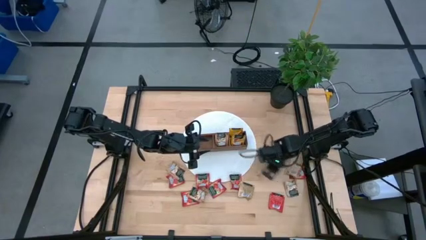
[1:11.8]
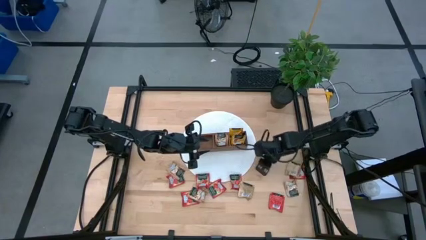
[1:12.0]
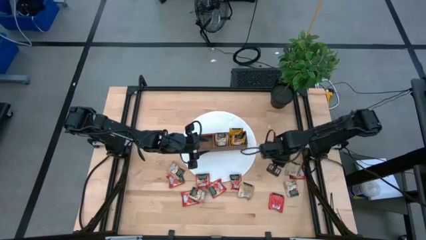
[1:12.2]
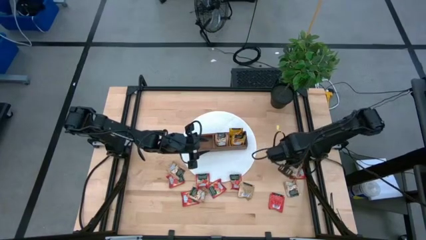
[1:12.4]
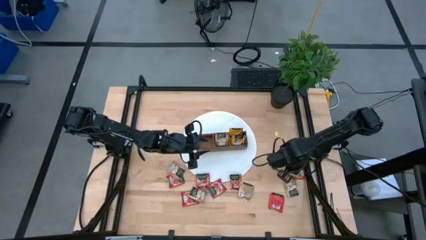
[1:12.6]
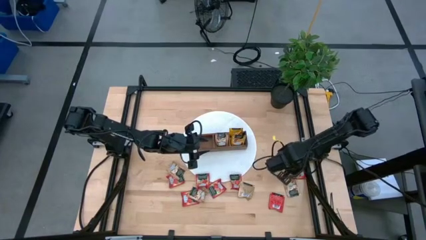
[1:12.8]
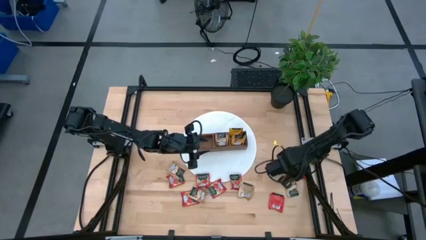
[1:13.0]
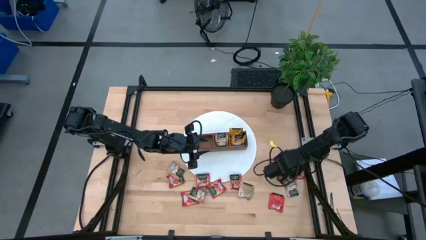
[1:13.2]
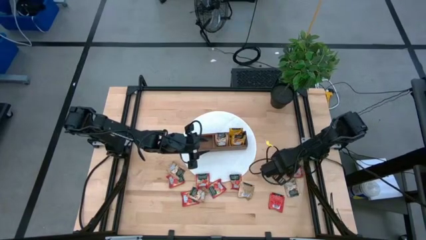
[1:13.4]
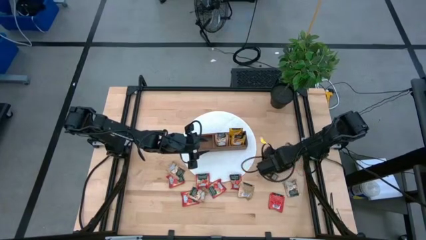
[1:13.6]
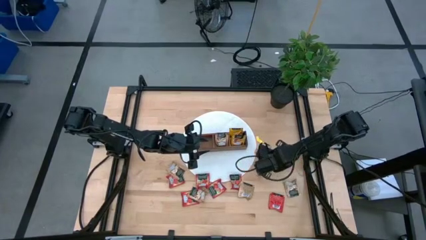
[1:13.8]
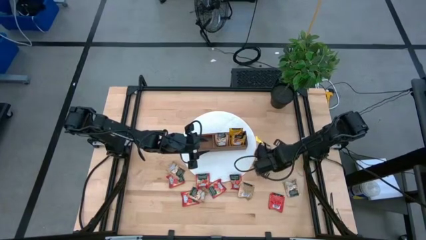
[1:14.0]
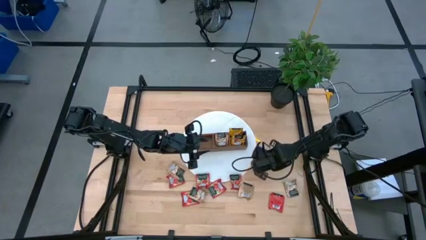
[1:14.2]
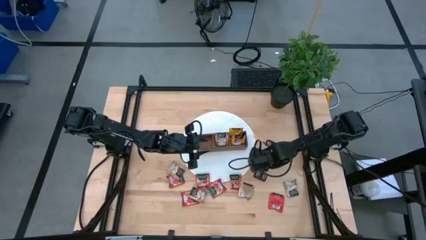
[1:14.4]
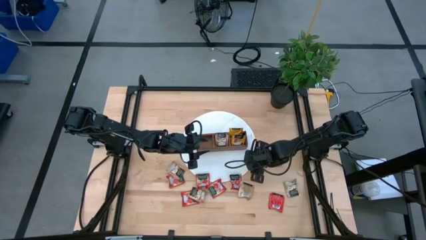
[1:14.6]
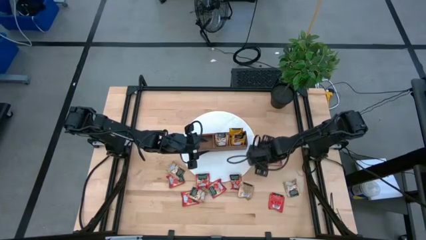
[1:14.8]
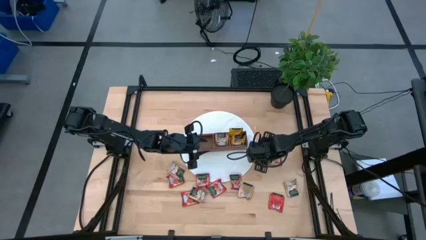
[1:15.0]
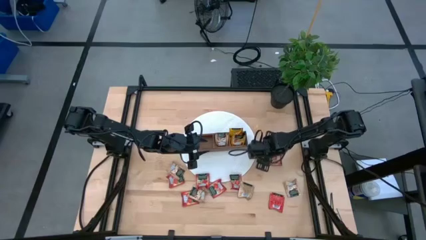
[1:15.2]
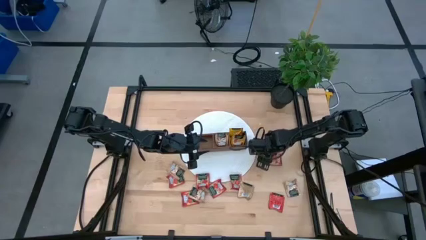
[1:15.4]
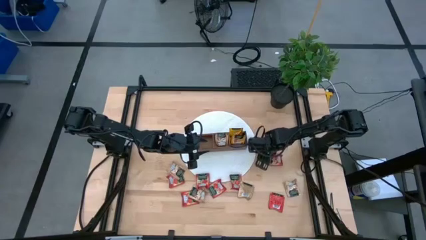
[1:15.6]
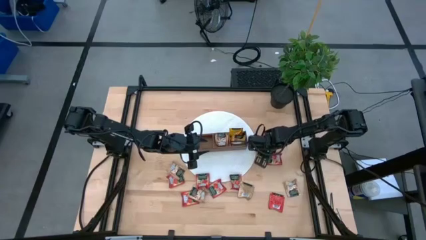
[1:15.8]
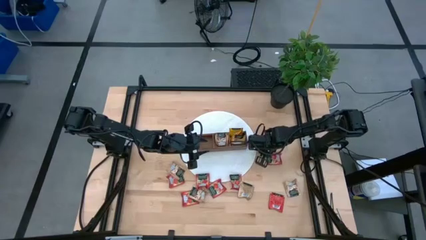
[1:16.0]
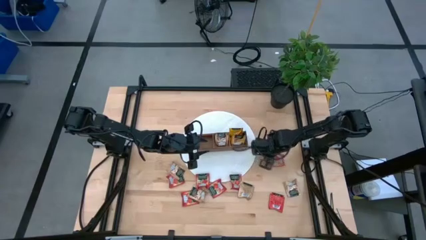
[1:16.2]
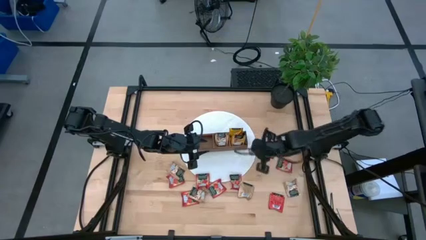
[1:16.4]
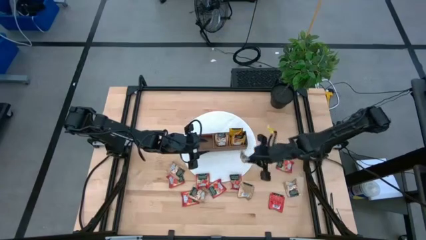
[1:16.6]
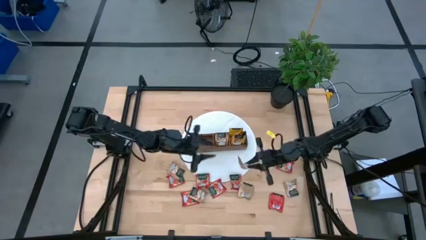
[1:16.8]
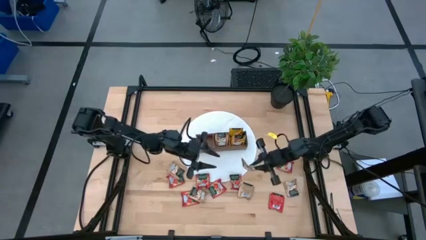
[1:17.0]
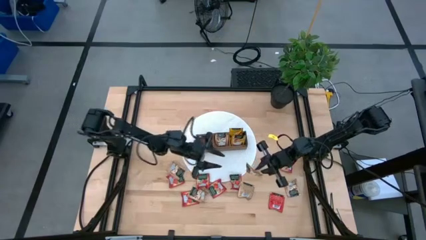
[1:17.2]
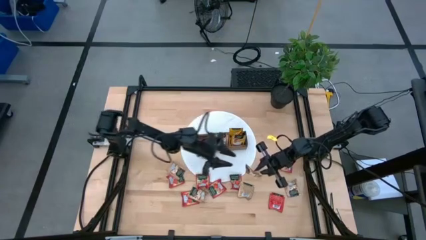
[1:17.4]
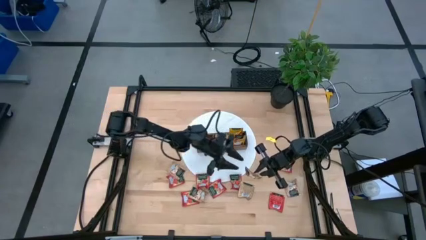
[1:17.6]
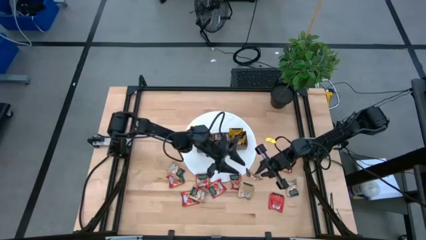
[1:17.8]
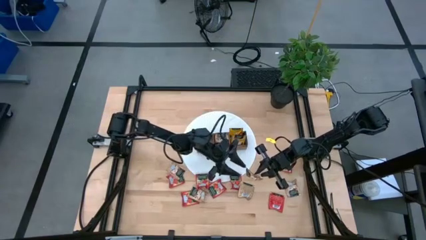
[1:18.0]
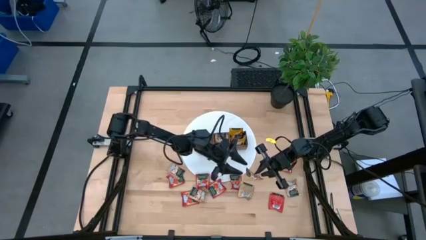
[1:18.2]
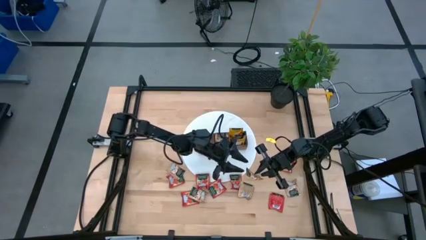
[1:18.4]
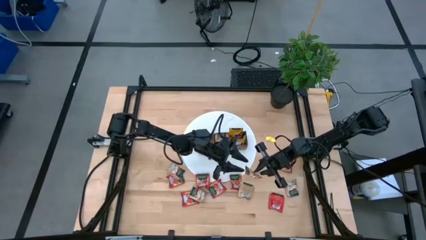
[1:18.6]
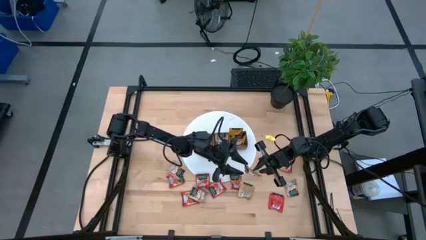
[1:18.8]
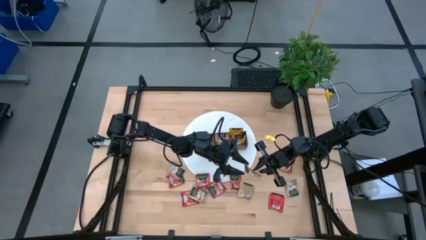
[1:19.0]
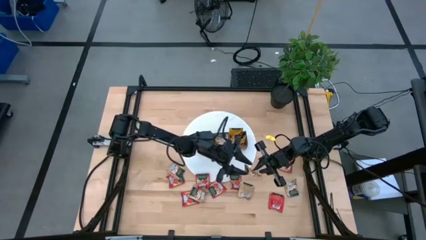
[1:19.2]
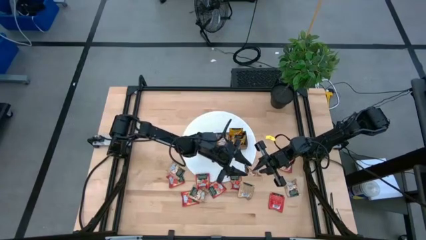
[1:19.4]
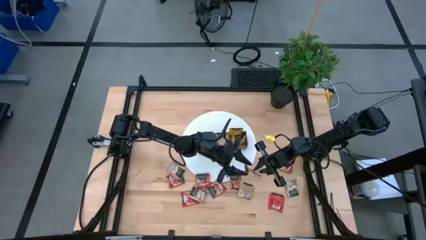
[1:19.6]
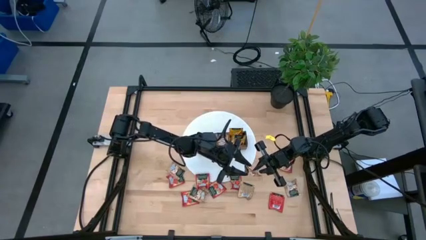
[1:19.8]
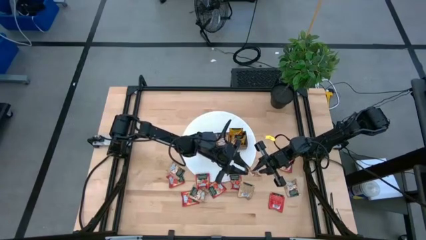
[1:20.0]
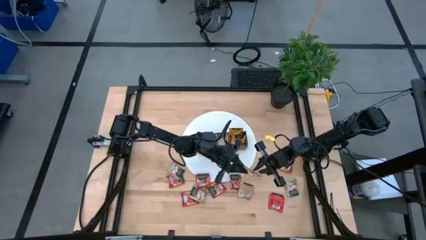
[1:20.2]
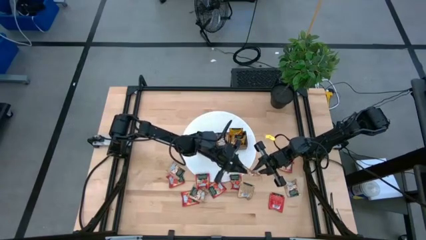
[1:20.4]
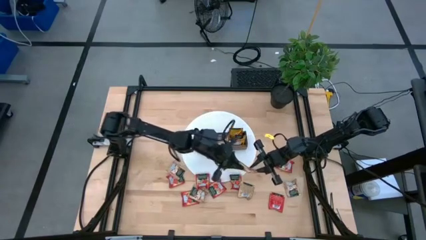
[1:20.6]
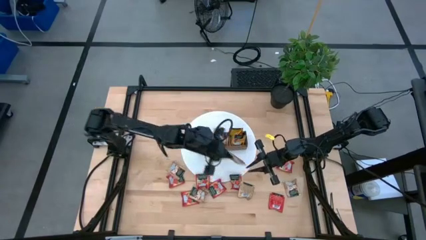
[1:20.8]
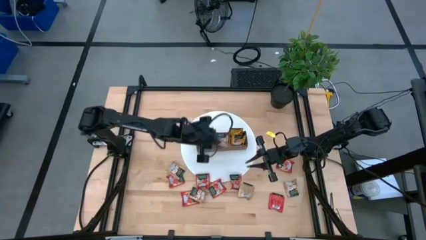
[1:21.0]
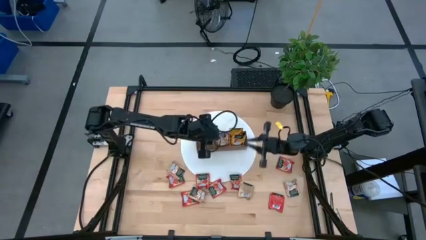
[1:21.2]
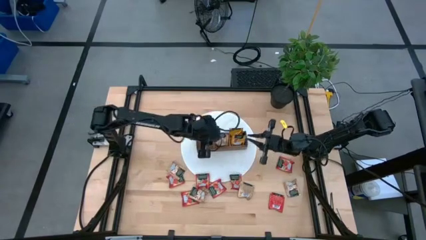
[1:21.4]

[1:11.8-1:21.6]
Task: Pick & Place Tea
Put the brown tea bag into the middle section of the wooden organizer

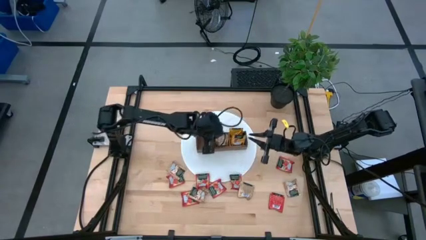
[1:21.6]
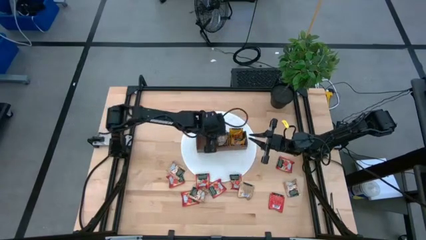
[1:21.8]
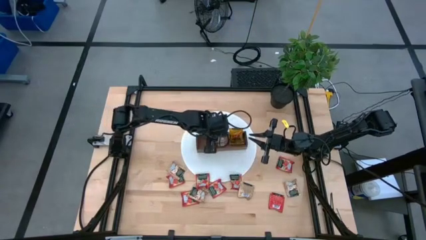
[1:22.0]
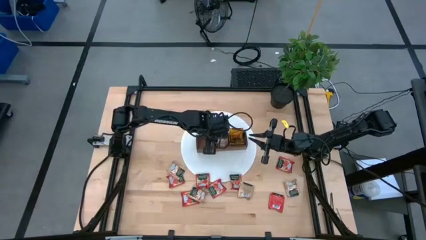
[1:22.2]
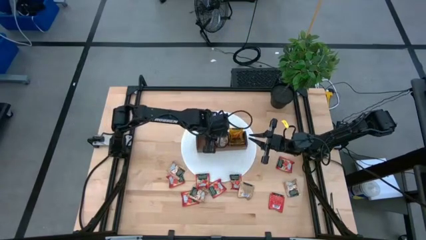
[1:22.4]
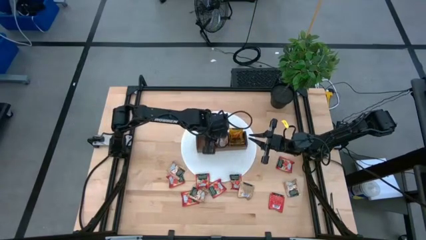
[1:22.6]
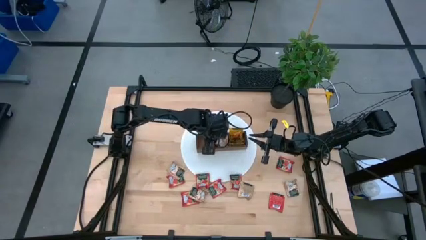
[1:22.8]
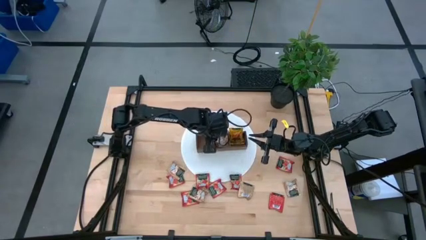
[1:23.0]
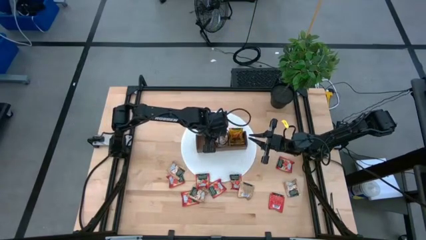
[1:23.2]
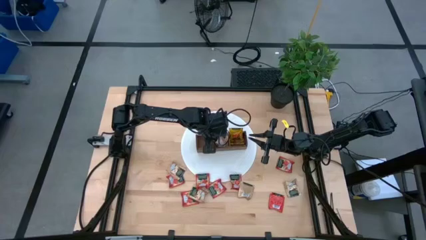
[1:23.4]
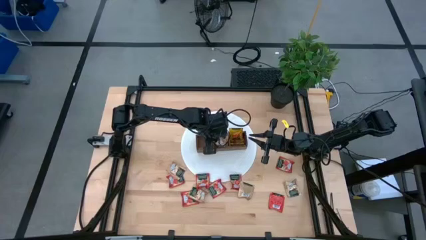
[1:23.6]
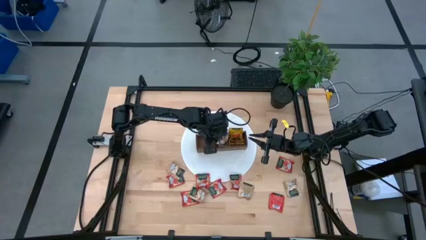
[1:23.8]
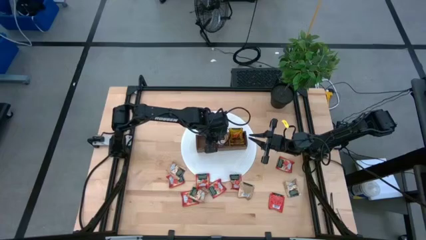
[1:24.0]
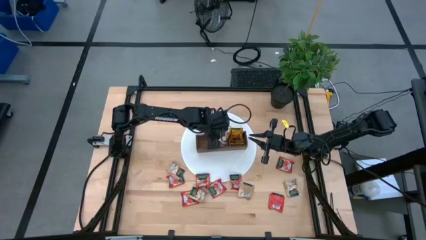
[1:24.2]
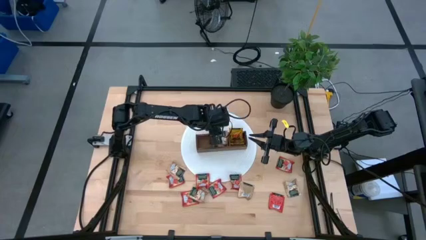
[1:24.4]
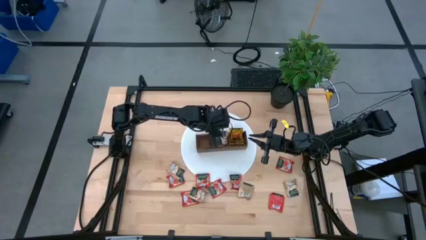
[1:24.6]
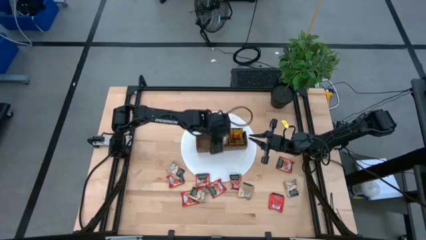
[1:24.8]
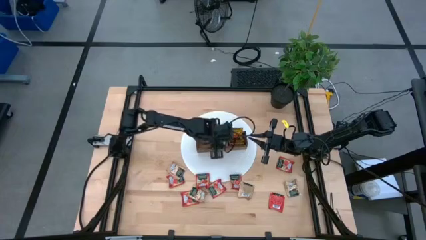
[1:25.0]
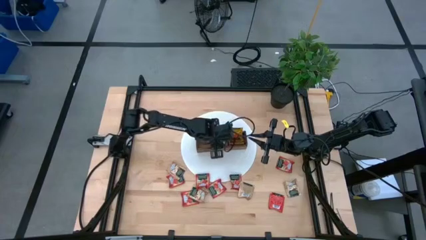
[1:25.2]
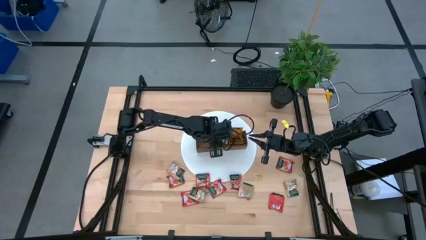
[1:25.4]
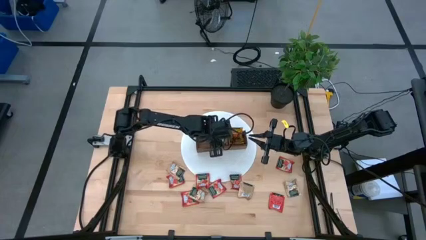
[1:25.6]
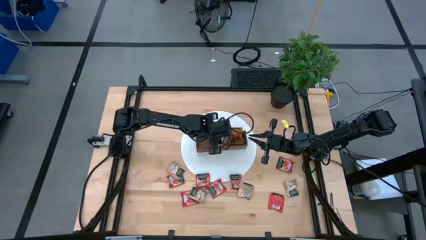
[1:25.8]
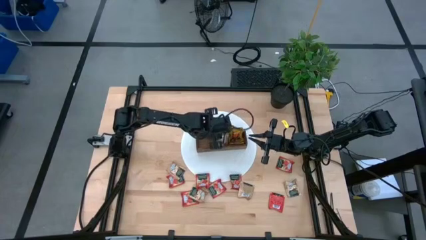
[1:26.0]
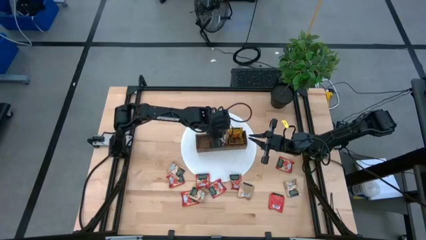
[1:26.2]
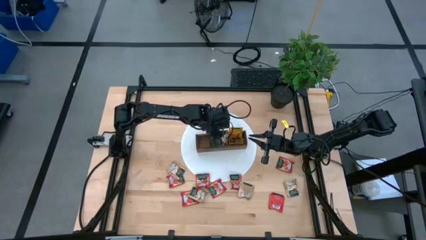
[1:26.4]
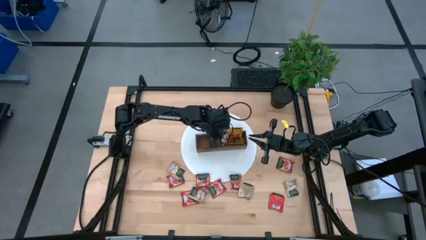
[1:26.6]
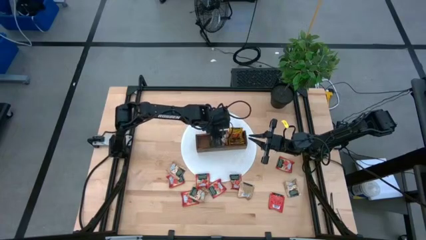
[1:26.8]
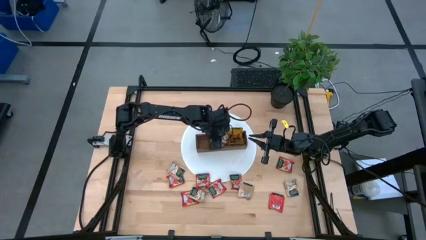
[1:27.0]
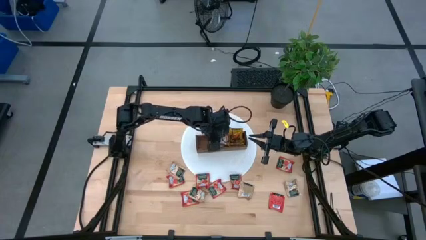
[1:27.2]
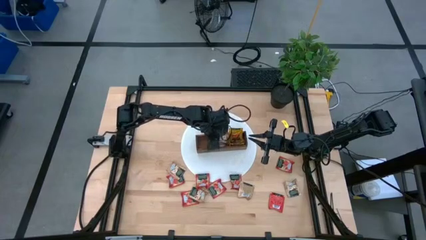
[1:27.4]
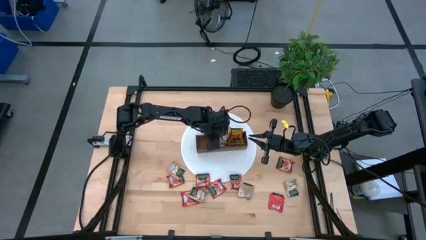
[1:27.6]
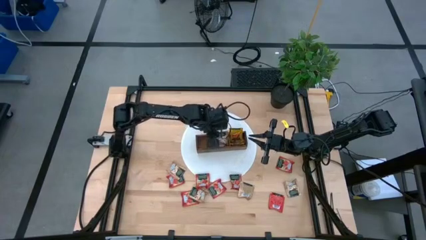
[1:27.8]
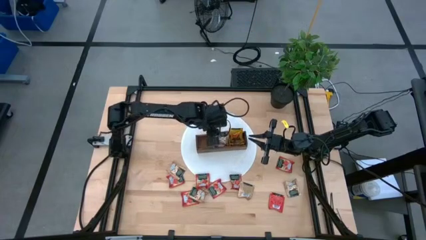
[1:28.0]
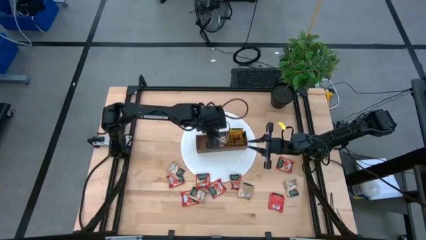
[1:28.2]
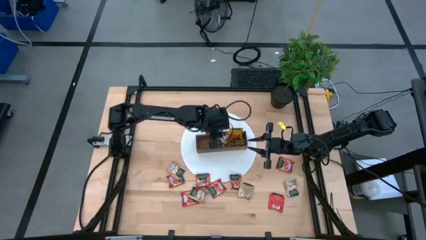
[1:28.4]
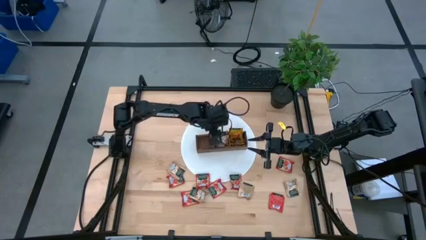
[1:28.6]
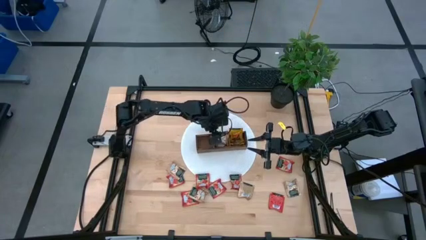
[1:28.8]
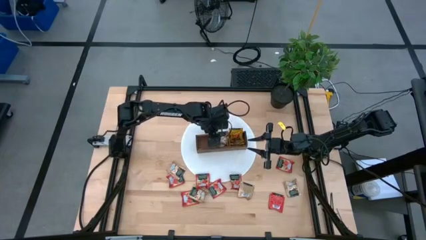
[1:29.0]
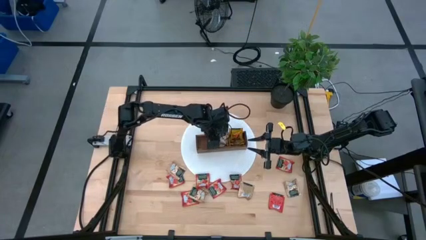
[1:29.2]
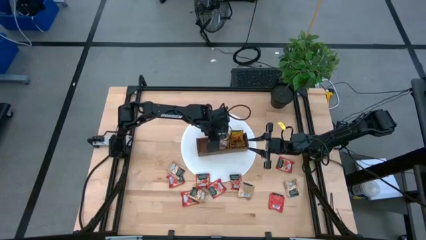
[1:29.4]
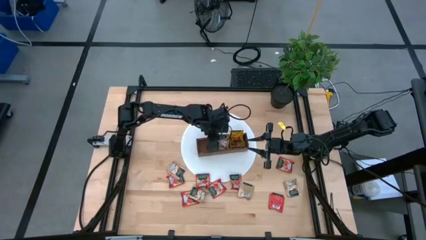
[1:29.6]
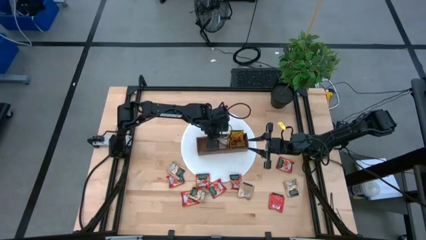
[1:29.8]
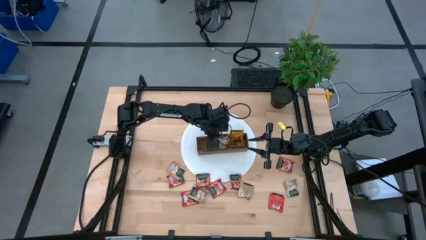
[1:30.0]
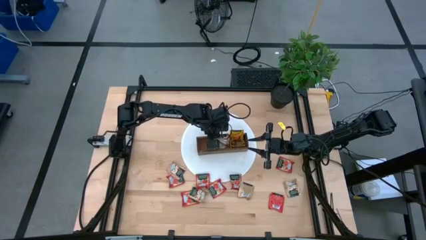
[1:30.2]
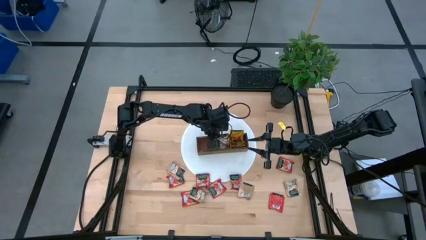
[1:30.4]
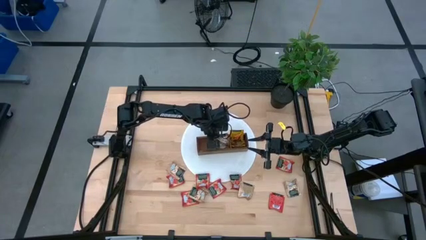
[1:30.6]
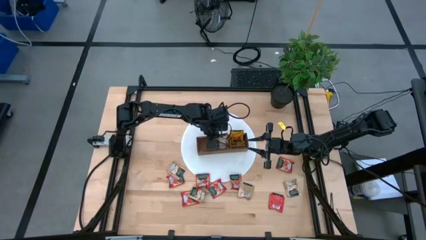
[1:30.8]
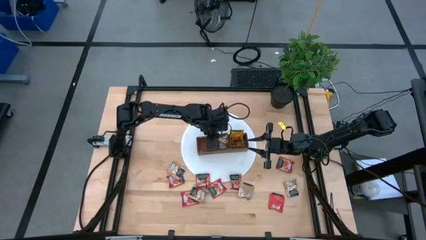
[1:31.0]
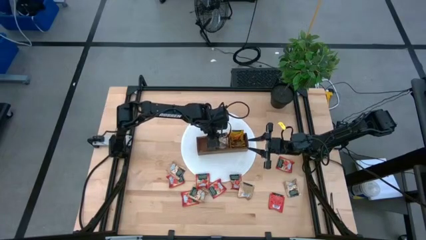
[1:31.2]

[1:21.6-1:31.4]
Put the brown tea bag into the middle section of the wooden organizer
